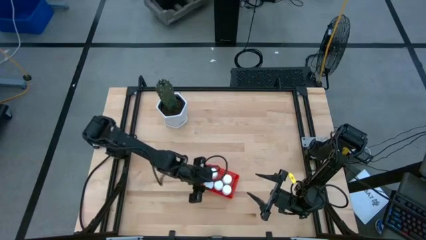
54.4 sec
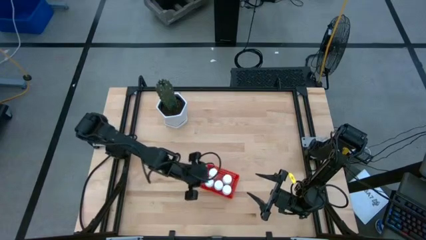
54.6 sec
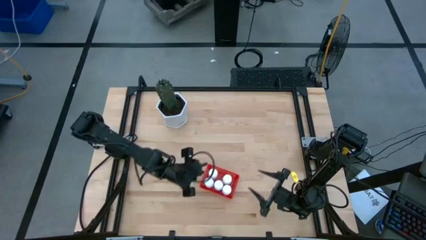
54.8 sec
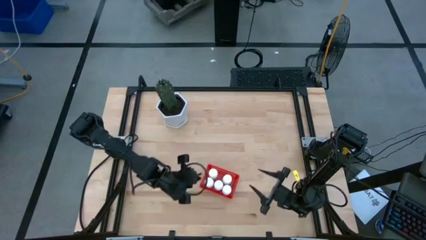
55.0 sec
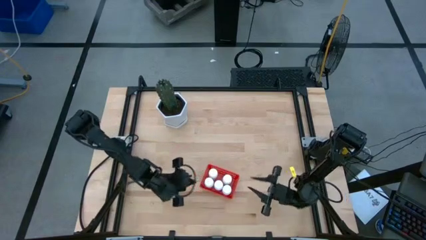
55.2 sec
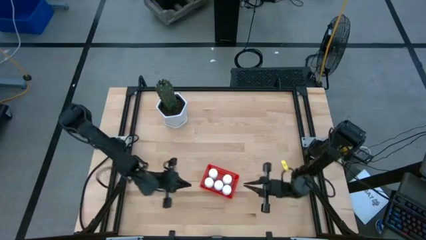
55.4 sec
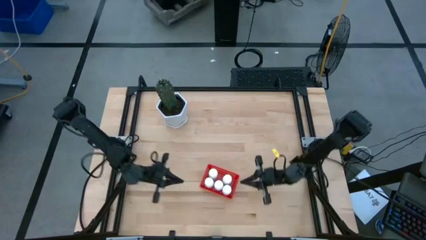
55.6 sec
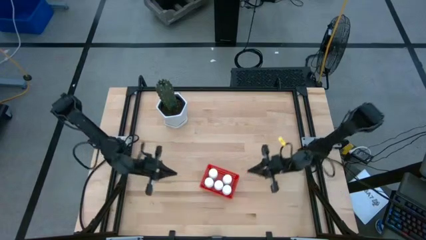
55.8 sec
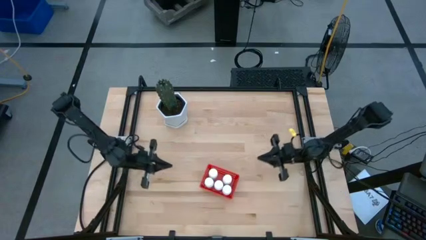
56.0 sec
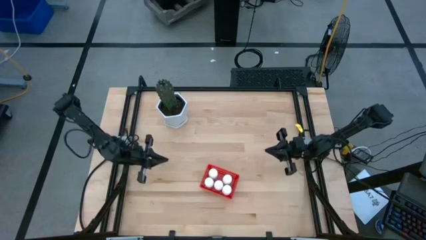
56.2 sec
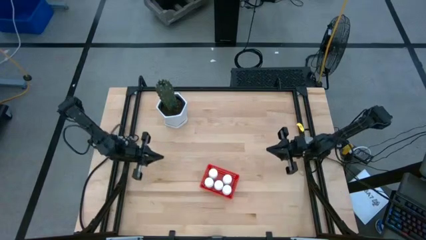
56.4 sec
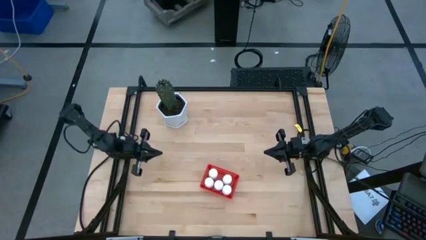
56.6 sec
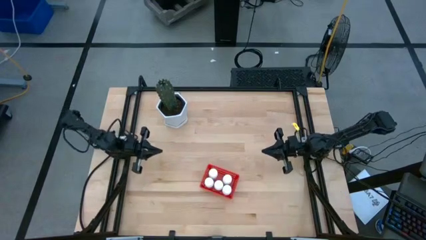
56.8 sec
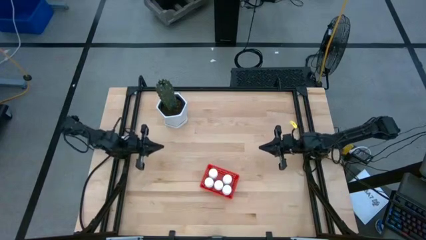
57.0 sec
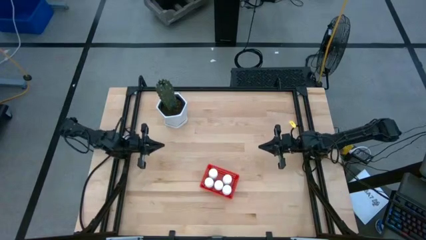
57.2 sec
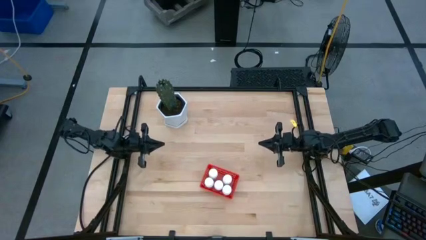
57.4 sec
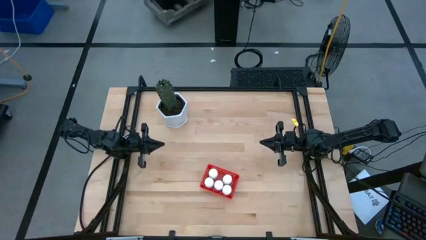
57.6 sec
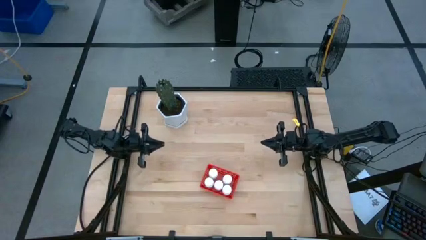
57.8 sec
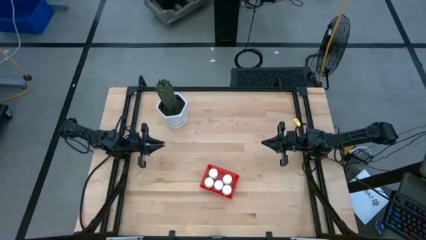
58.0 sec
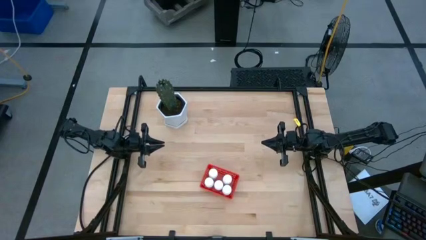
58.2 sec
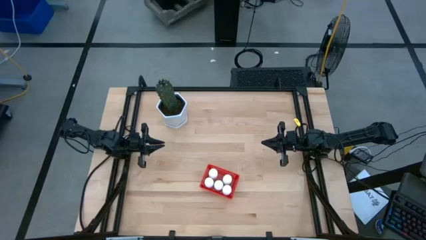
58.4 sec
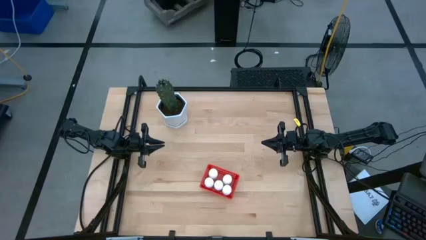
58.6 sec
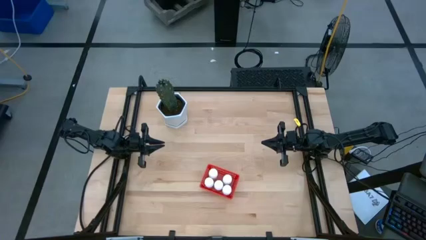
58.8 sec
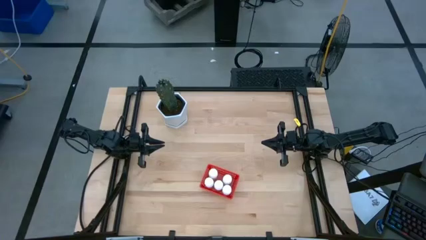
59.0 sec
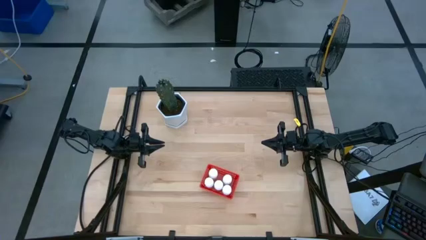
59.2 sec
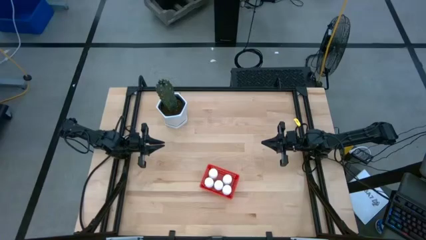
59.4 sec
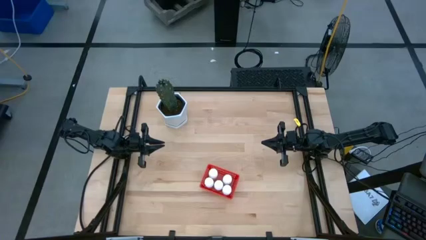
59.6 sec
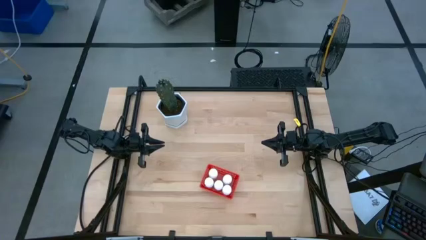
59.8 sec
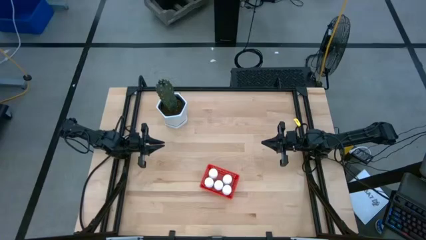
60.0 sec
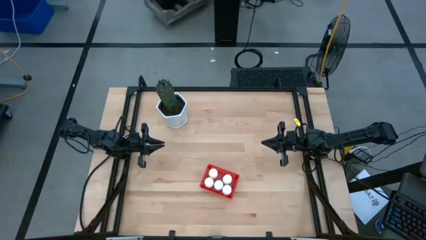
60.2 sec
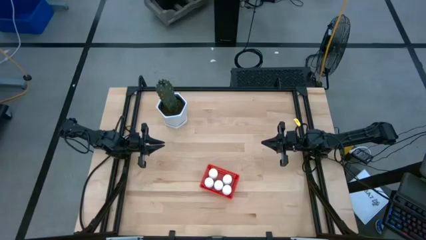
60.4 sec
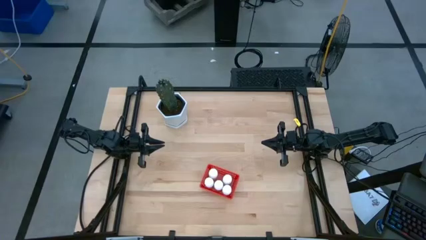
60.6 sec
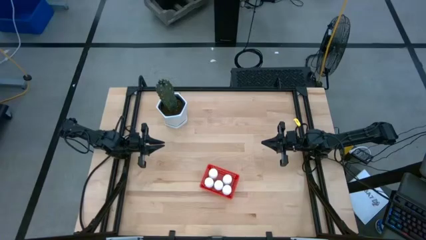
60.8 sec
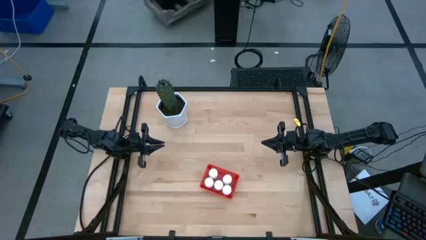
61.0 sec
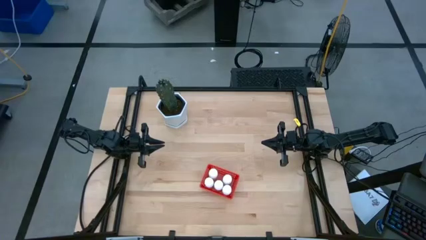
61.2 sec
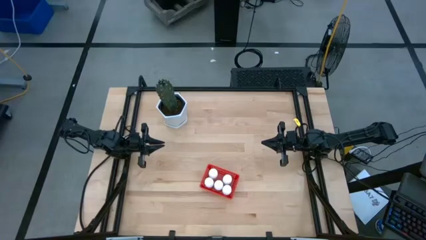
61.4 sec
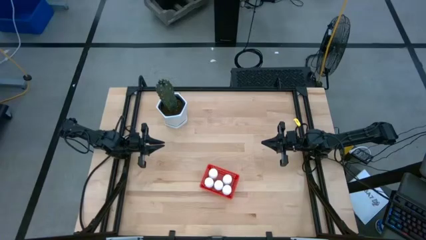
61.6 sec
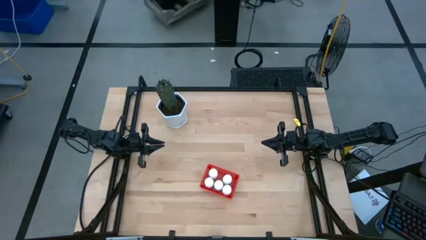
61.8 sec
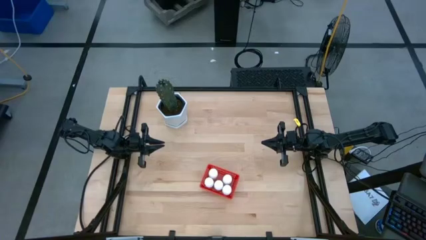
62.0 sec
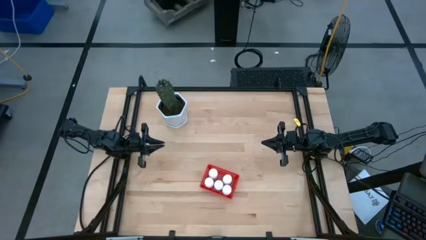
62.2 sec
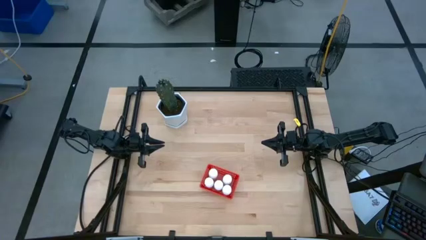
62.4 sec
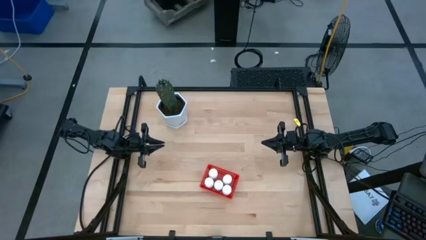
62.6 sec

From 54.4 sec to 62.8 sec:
Task: Pick and place pill bottles into a basket
Return to Home Position

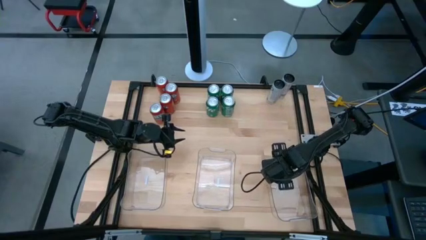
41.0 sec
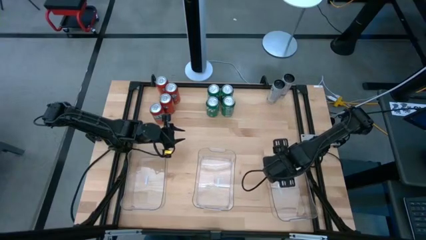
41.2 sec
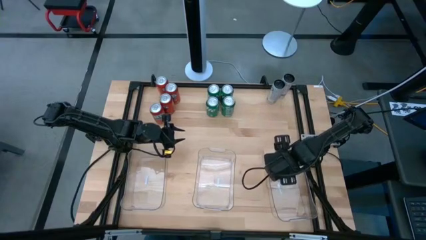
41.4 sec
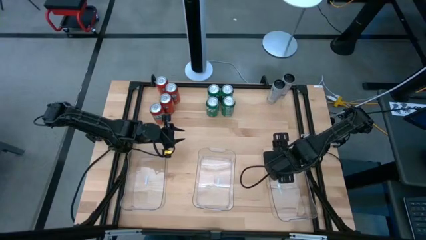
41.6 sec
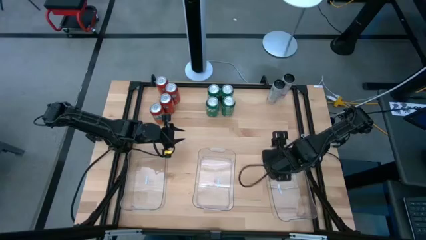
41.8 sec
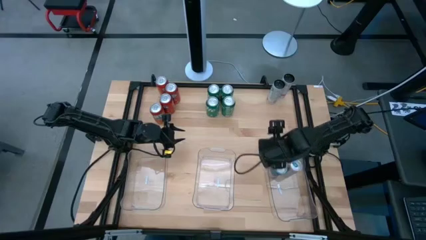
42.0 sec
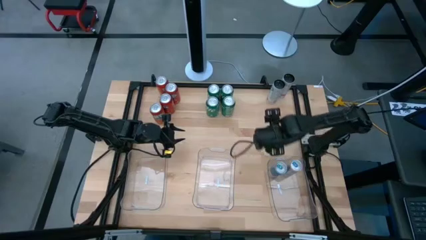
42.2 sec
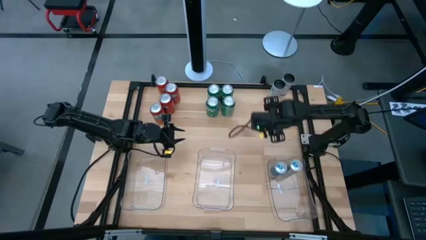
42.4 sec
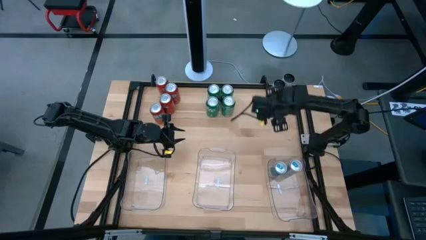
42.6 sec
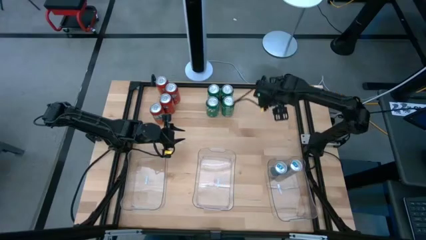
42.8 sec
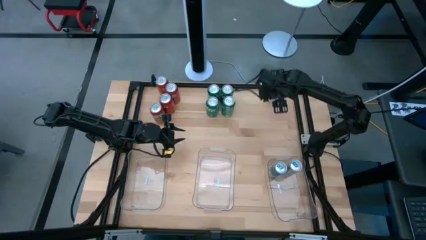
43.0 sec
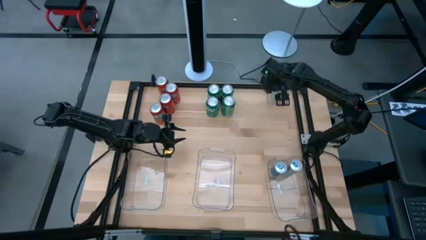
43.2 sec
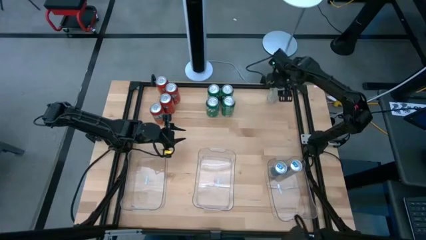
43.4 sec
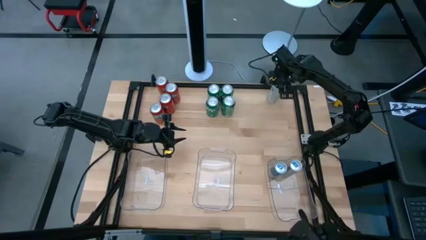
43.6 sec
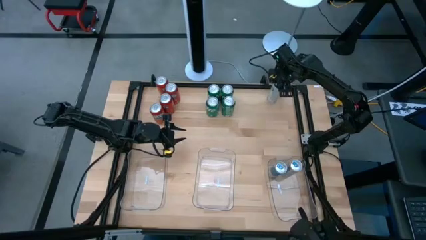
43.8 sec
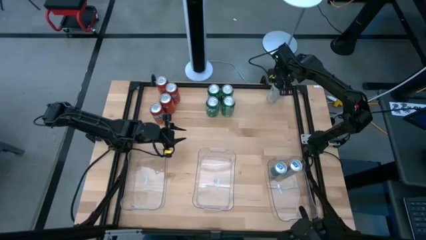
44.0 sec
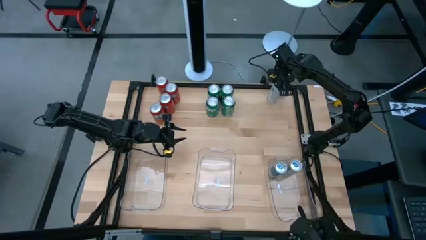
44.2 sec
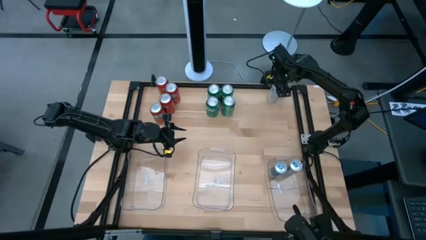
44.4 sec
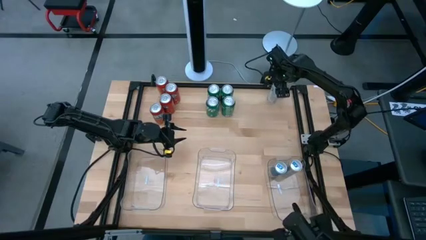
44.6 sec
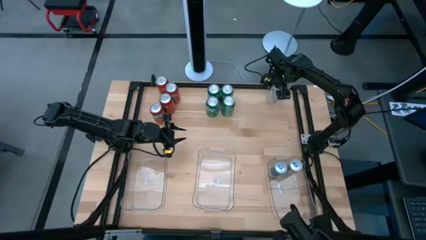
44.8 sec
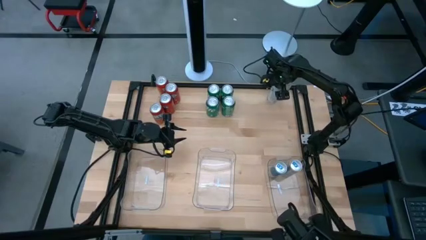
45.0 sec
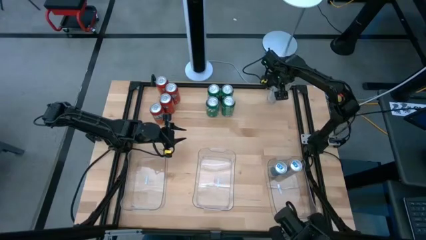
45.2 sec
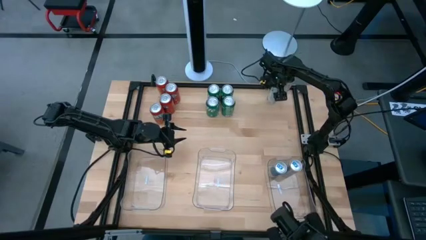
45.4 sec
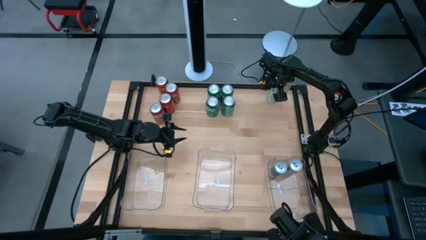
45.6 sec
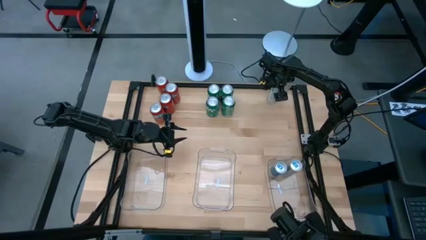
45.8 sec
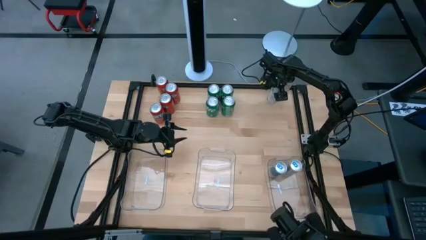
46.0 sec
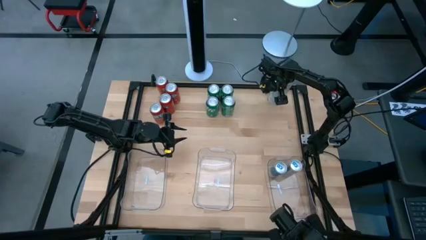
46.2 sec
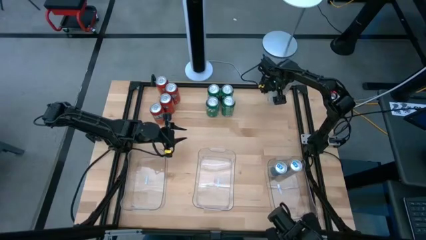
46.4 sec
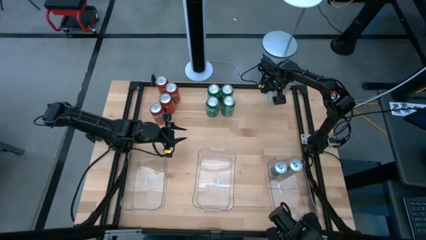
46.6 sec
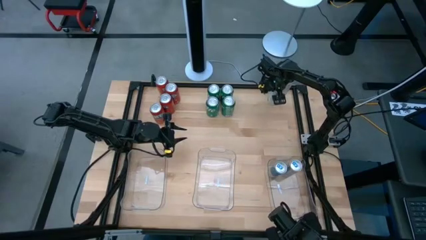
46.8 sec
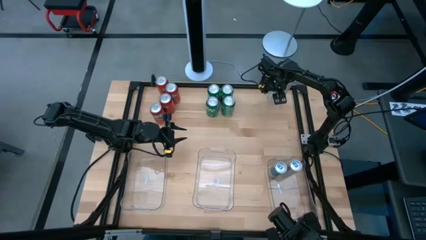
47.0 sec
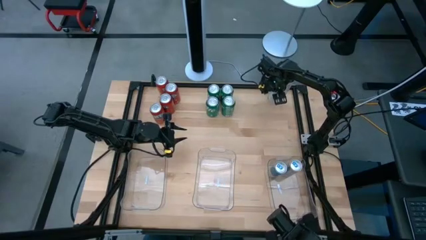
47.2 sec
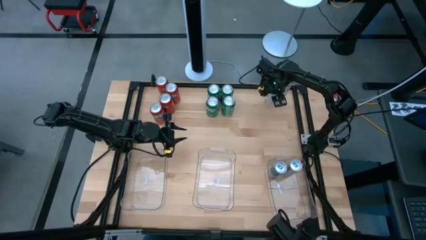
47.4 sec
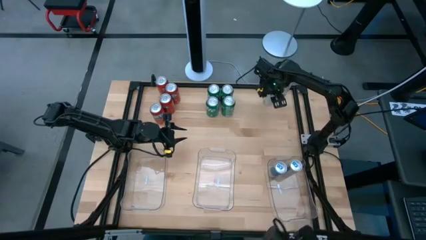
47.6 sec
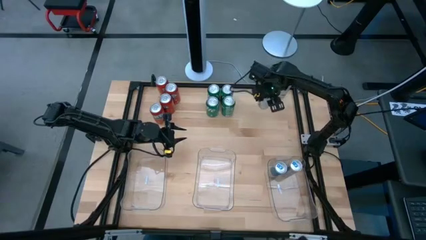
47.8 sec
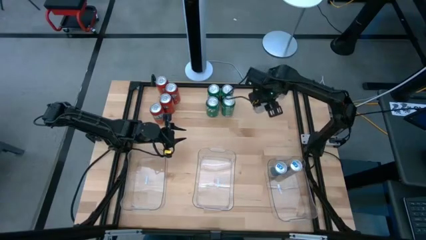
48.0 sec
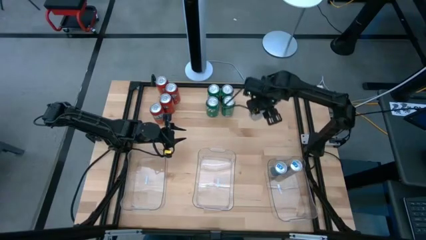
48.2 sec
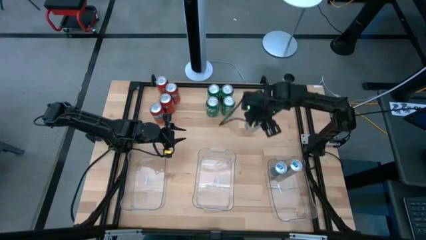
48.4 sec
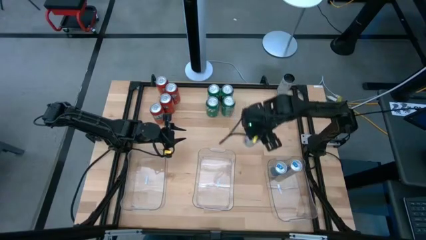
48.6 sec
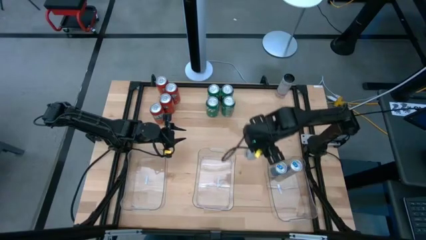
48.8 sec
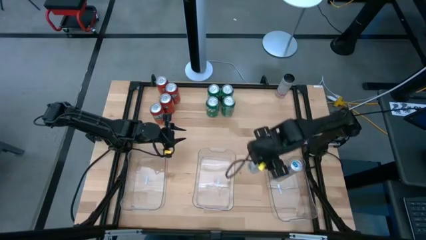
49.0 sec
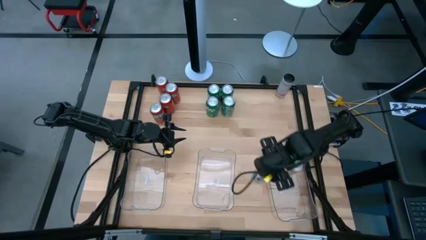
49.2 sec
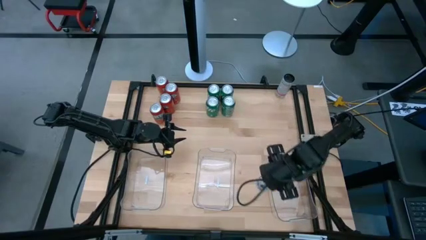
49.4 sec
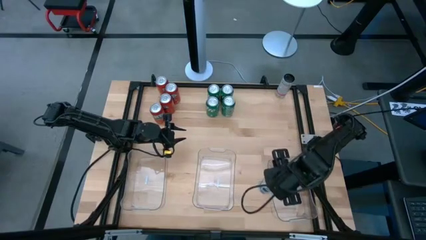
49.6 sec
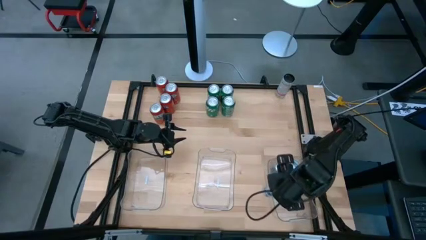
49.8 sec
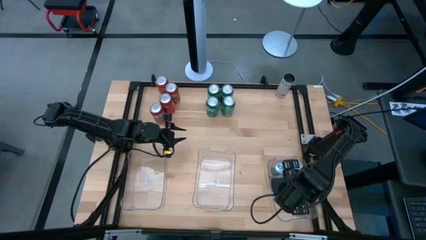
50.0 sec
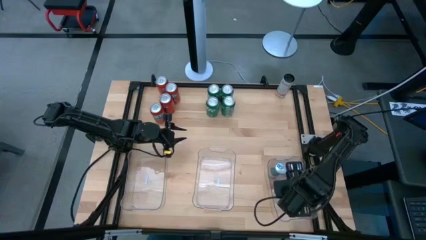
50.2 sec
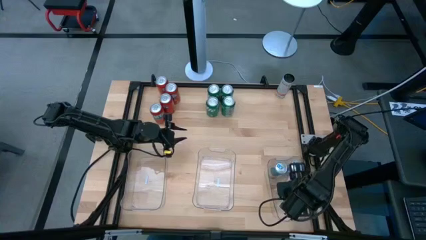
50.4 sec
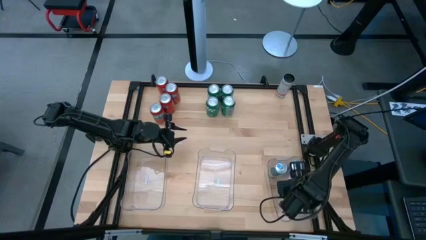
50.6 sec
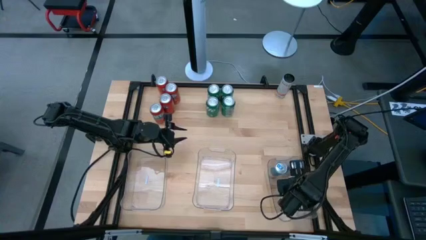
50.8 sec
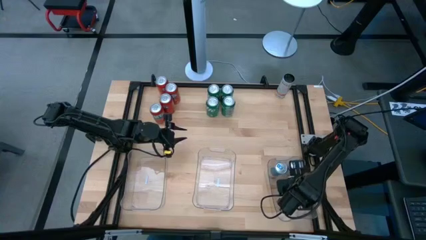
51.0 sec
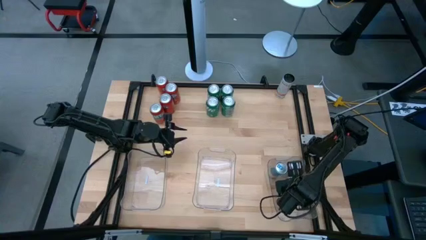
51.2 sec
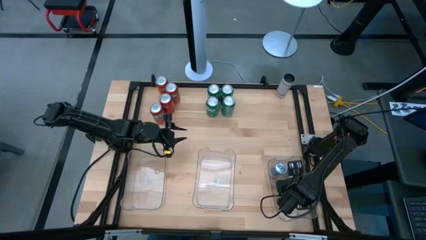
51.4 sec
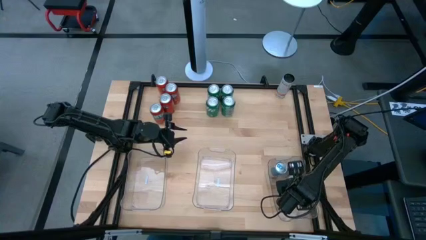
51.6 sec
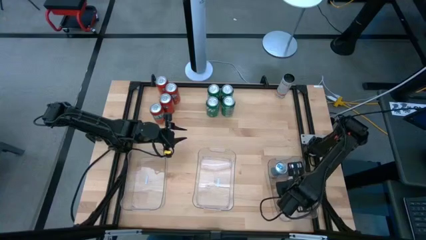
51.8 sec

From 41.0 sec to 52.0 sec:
Task: Sort soda cans
Put the white and pink soda can into the right transparent bin
